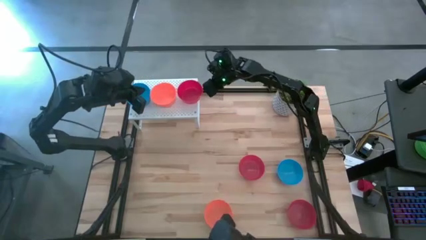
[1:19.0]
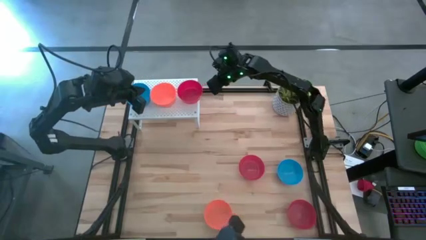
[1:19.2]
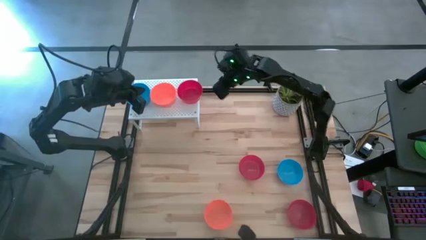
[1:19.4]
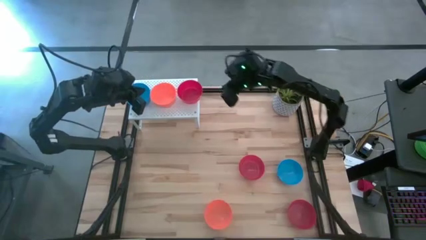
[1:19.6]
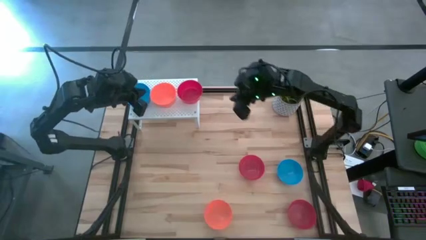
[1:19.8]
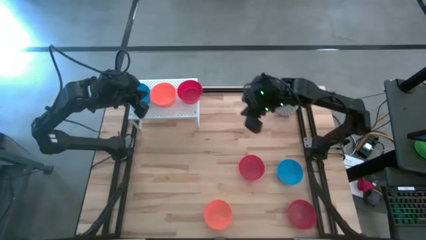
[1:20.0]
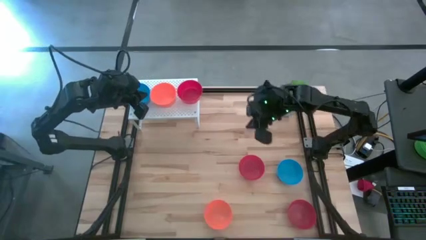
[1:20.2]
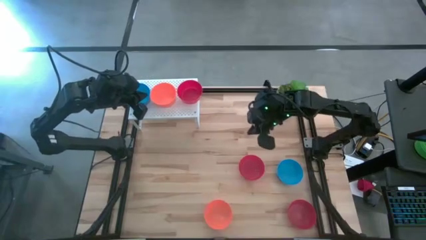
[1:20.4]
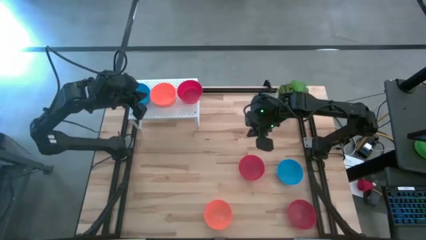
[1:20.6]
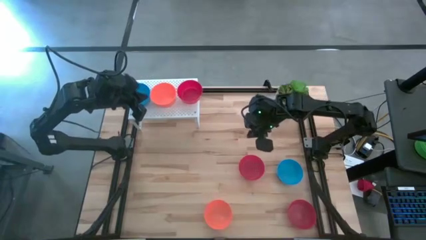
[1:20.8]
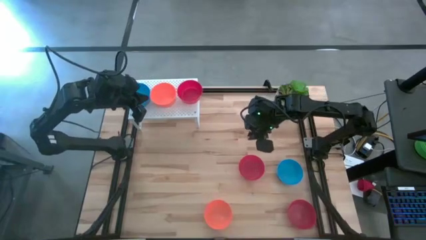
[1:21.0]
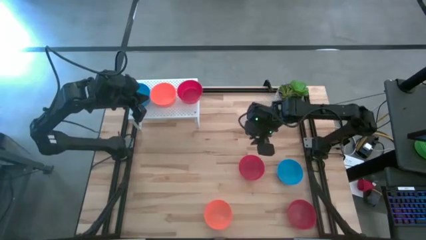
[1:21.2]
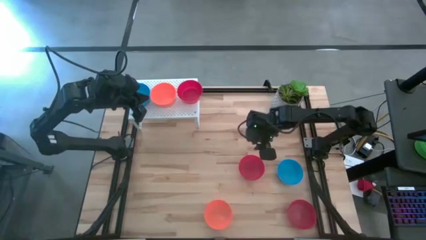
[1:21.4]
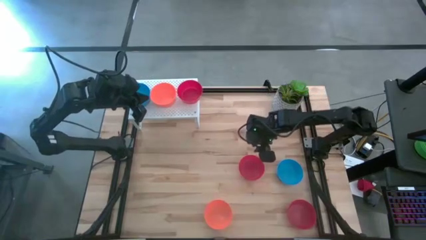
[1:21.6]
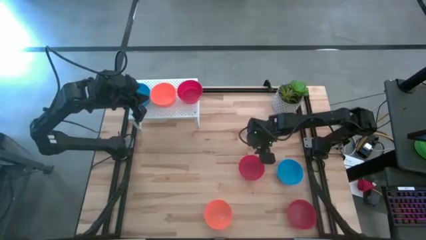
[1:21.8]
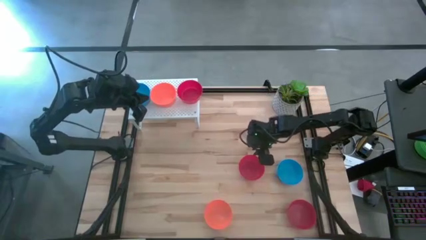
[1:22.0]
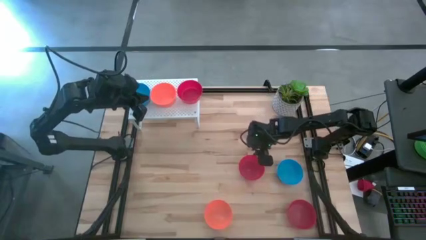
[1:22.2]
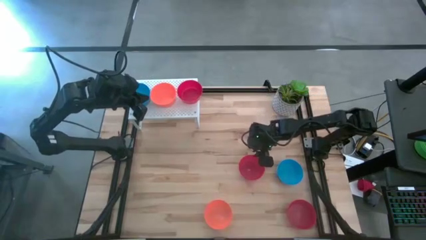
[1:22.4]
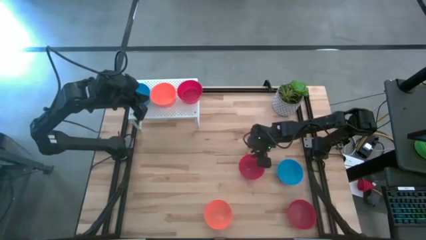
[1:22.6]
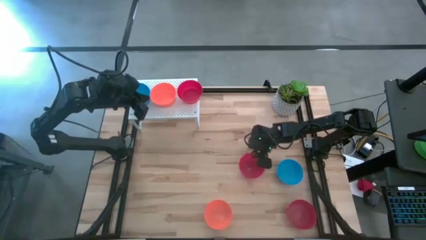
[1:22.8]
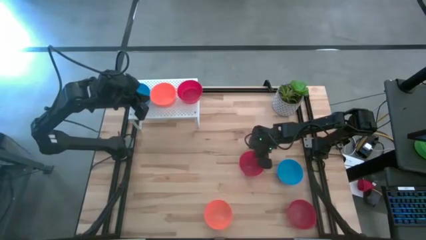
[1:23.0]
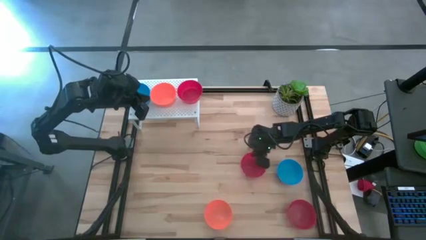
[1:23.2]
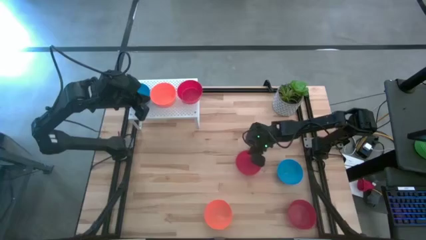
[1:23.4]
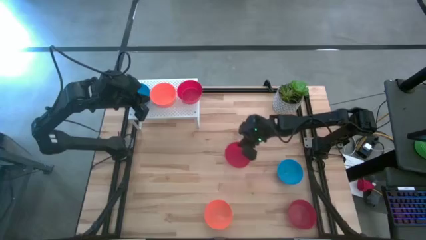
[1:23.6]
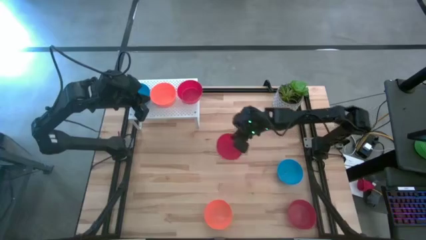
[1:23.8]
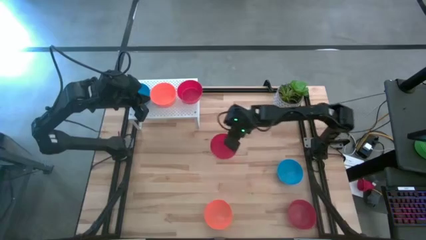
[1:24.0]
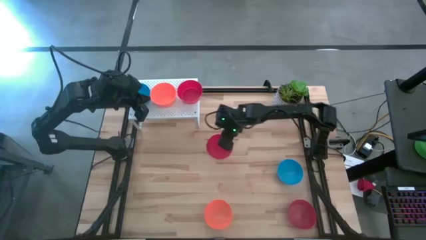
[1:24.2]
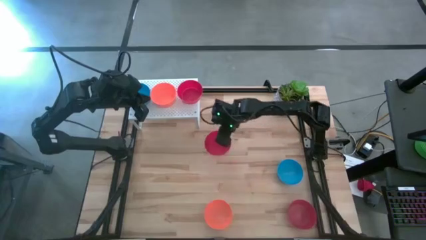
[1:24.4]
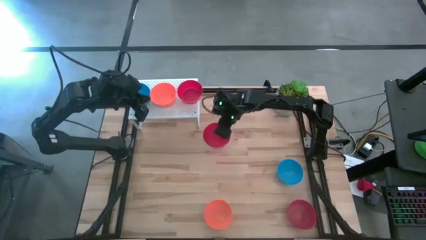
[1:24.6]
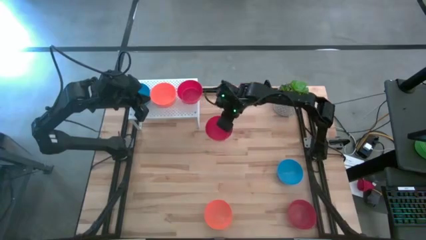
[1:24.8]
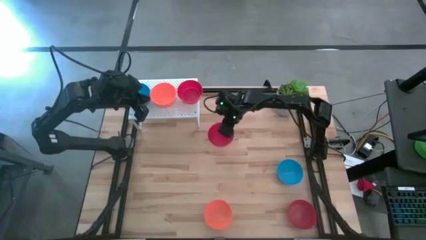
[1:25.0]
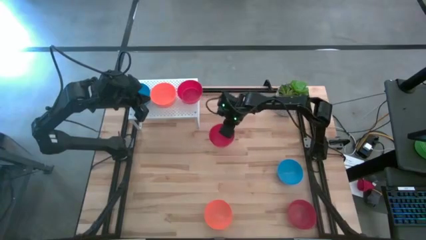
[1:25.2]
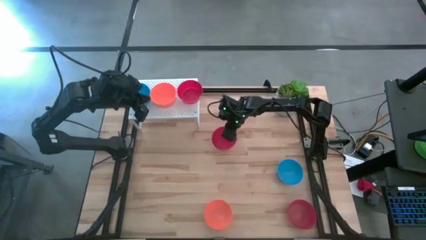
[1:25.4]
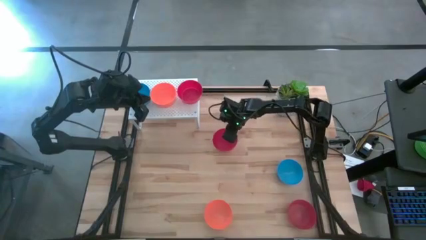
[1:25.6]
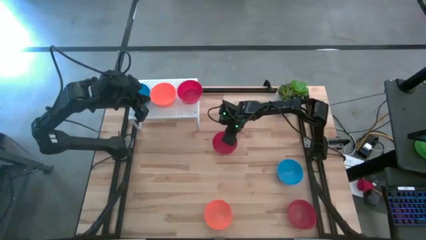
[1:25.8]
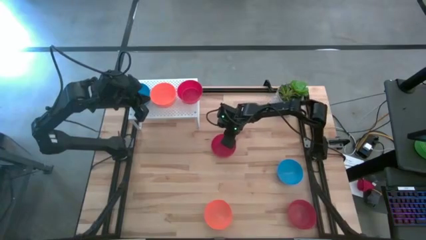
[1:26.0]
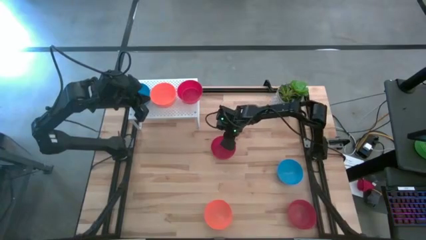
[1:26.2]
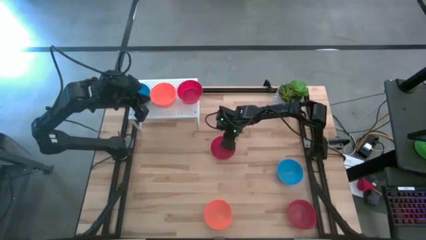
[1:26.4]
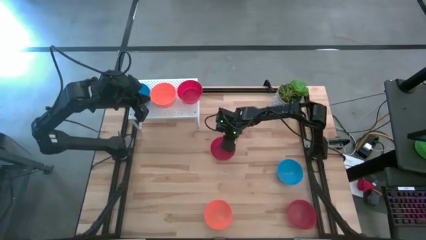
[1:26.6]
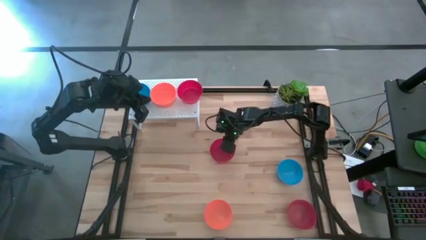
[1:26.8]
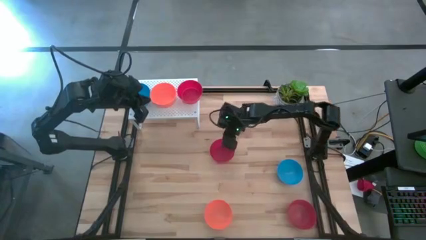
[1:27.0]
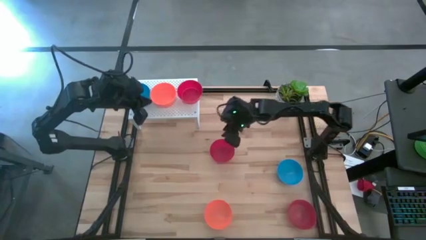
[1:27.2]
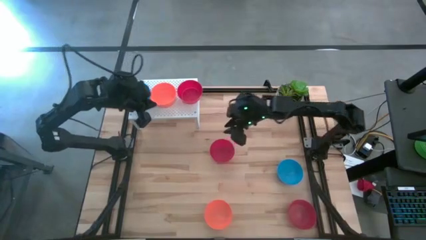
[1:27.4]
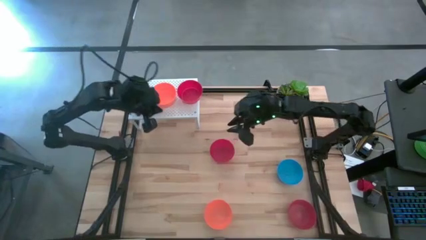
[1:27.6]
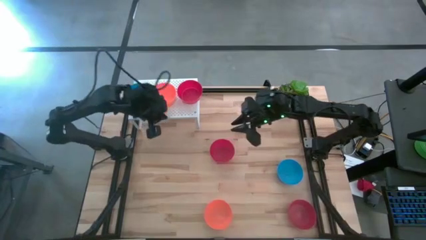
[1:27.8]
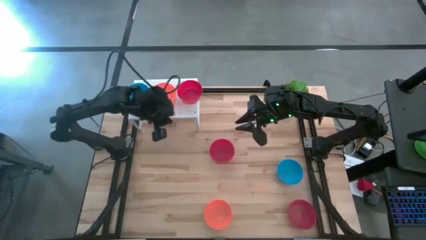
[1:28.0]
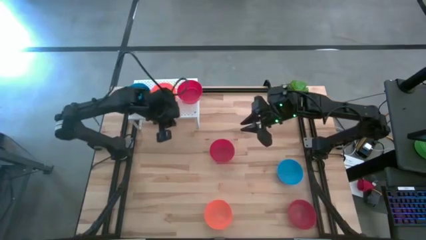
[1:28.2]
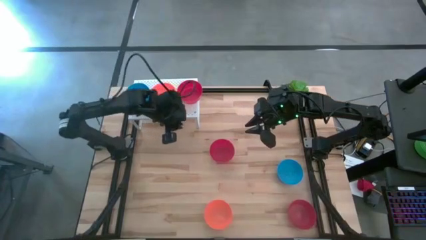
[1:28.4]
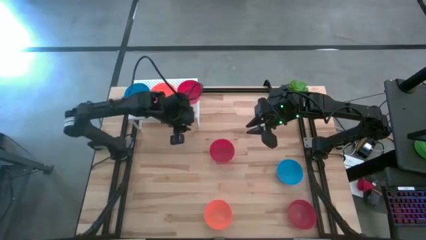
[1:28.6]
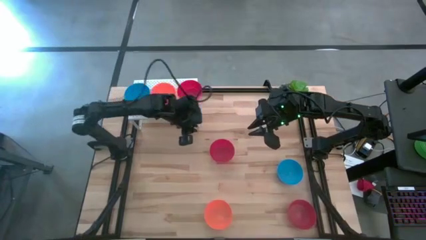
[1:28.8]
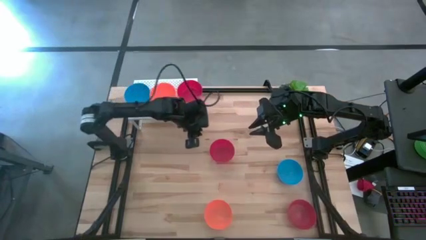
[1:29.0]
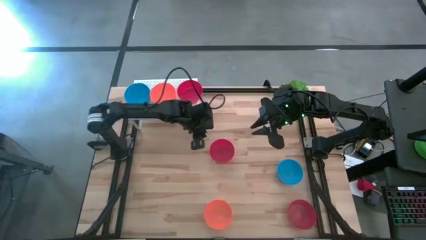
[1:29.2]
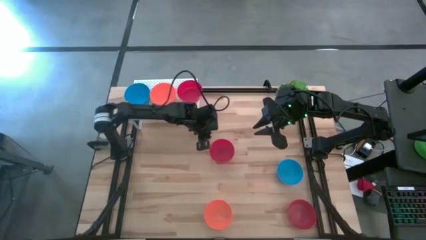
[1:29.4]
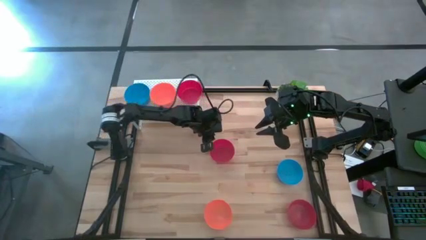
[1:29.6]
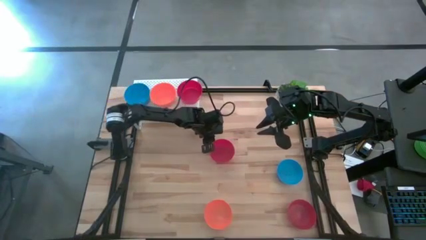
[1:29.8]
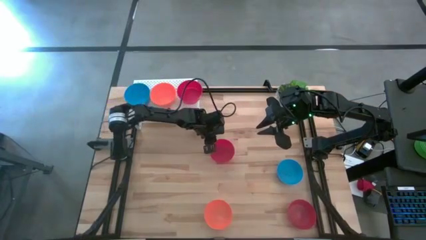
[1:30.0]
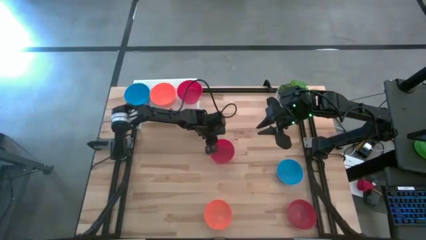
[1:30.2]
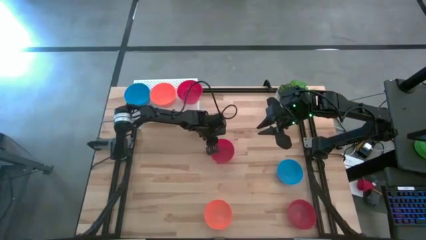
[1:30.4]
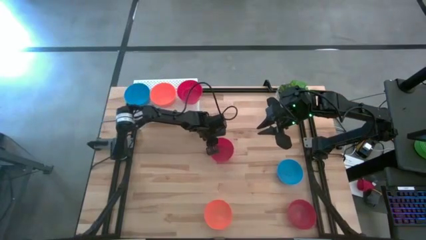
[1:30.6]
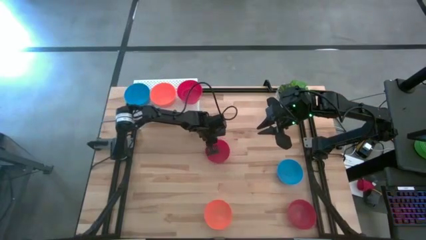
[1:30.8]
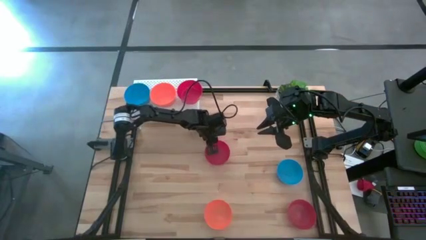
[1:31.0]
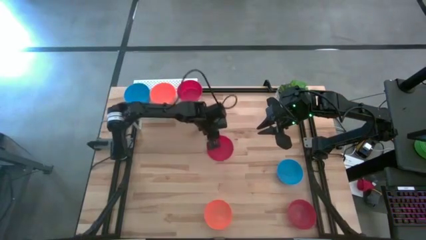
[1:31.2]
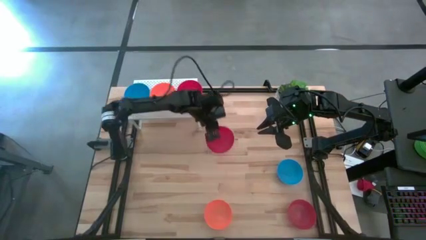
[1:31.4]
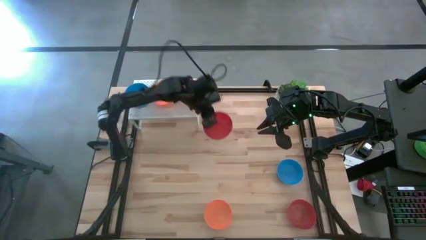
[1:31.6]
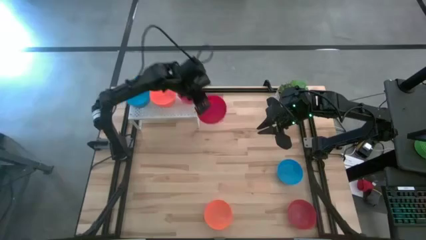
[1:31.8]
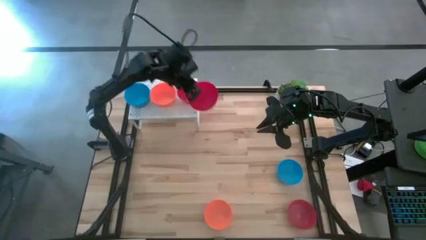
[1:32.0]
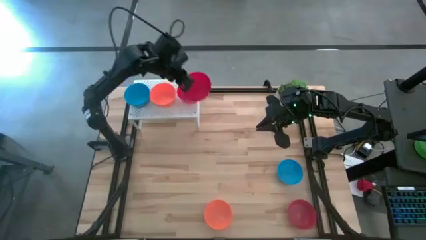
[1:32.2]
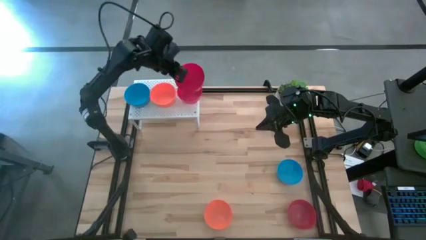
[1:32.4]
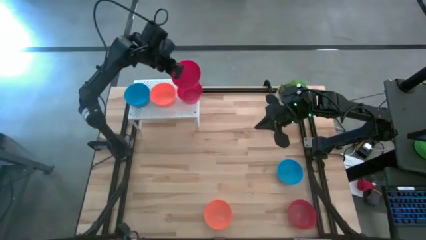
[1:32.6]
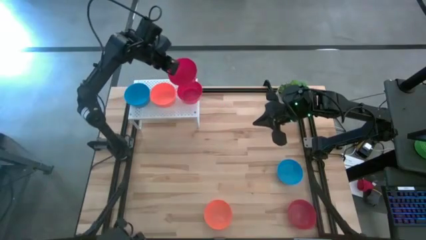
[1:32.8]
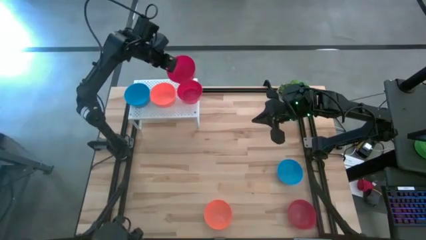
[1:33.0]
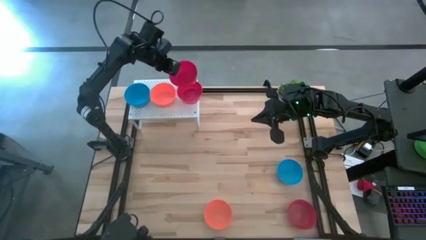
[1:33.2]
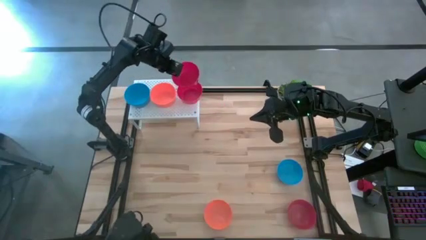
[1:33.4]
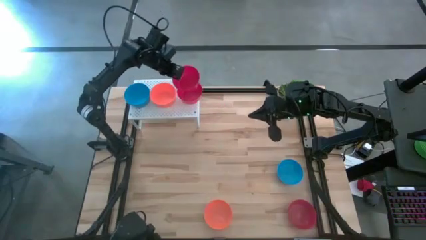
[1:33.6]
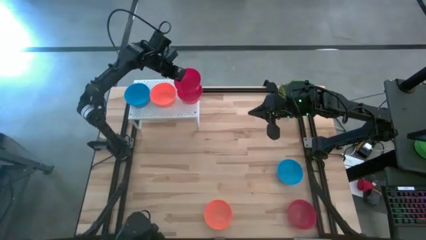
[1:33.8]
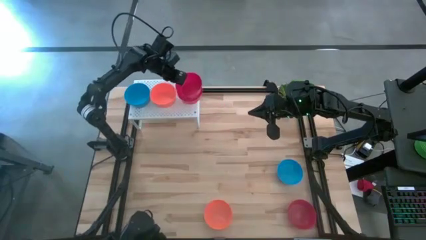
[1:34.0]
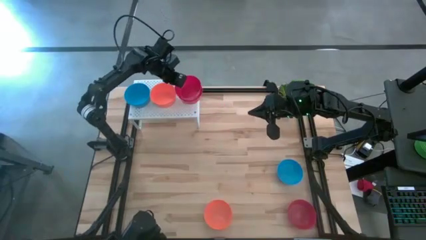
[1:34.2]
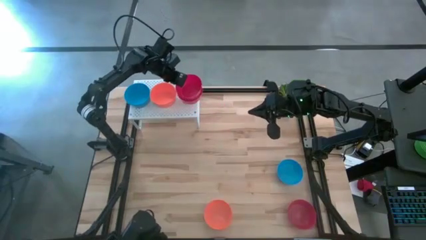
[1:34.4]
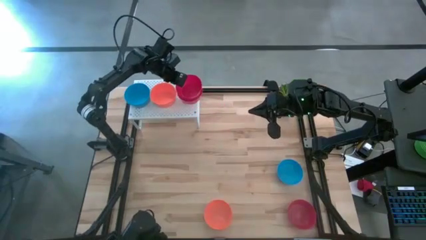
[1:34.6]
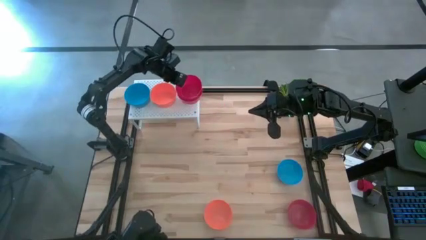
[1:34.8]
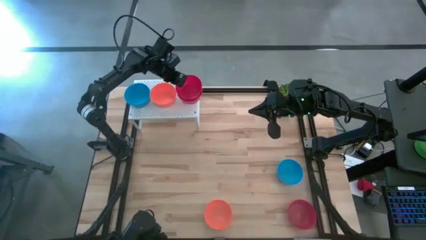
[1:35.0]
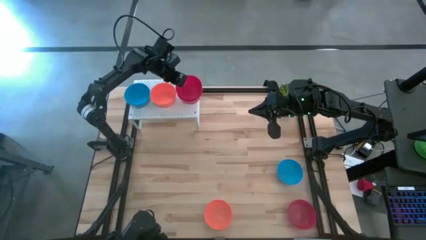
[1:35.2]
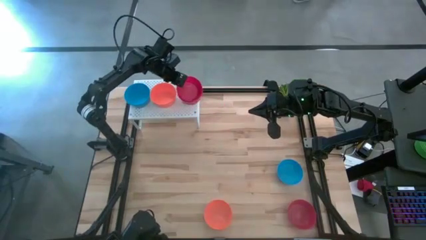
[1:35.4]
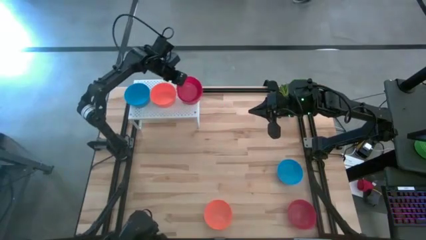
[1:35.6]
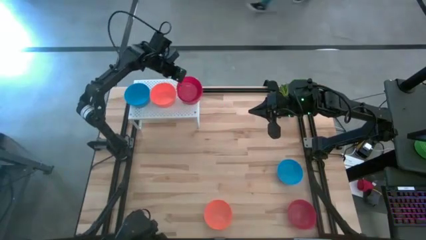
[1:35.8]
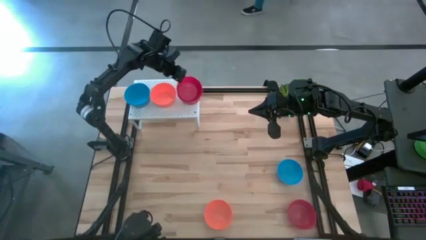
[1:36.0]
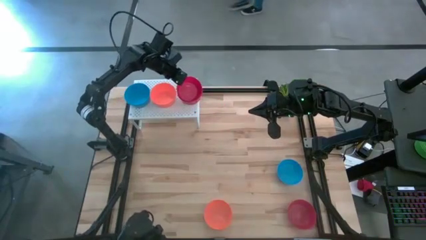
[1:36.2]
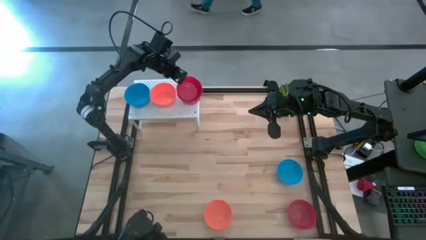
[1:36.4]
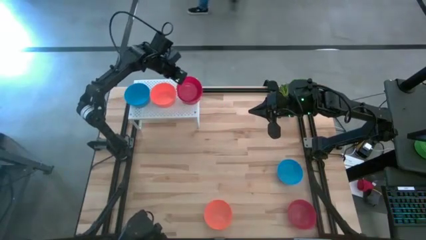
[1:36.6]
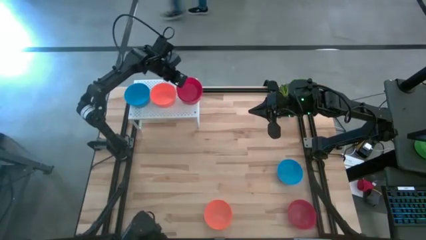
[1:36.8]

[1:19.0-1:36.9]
Task: Pick & Place Mini bowls
Stack the top red bowl on top of the red bowl on the shelf
